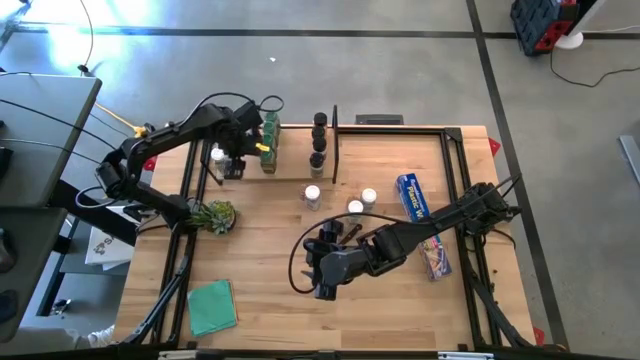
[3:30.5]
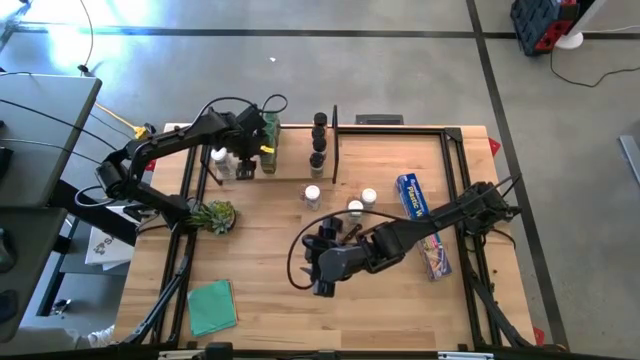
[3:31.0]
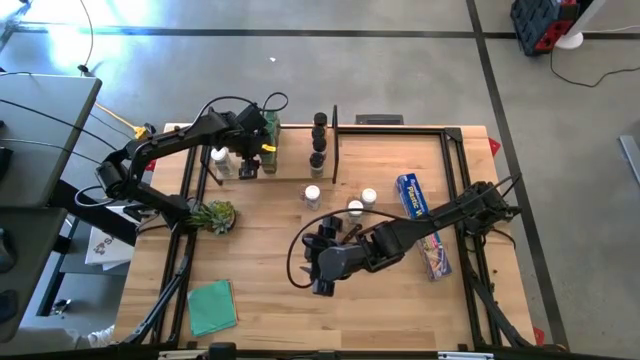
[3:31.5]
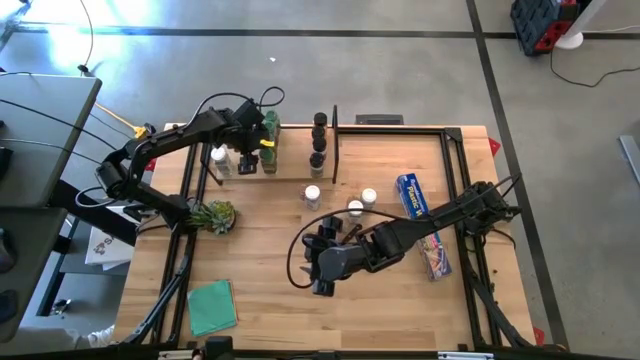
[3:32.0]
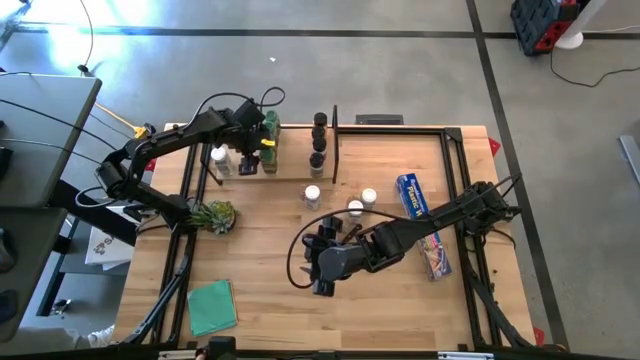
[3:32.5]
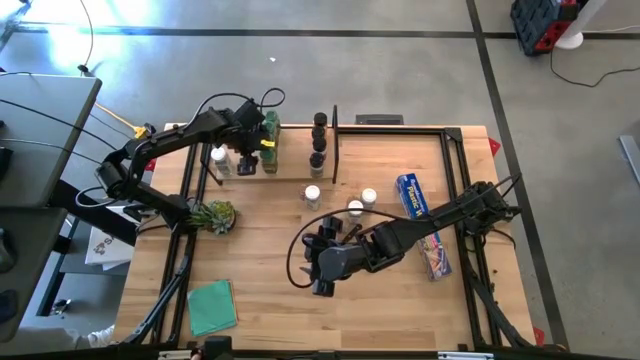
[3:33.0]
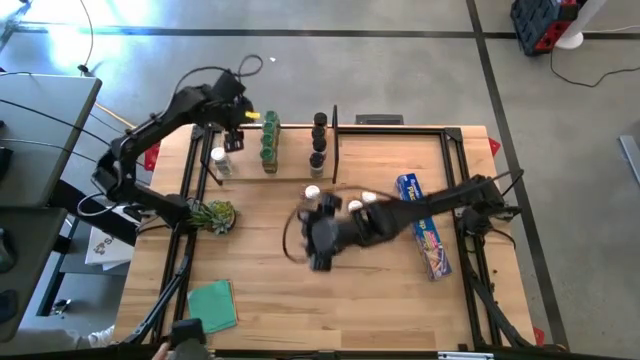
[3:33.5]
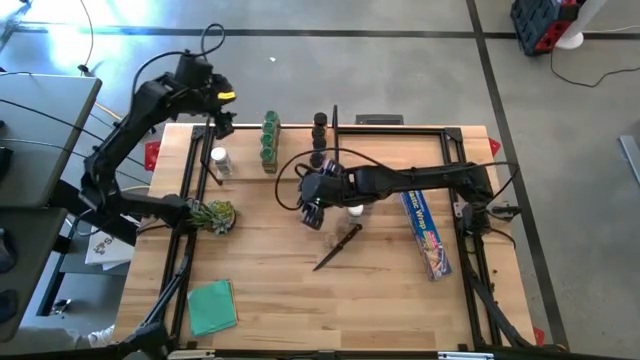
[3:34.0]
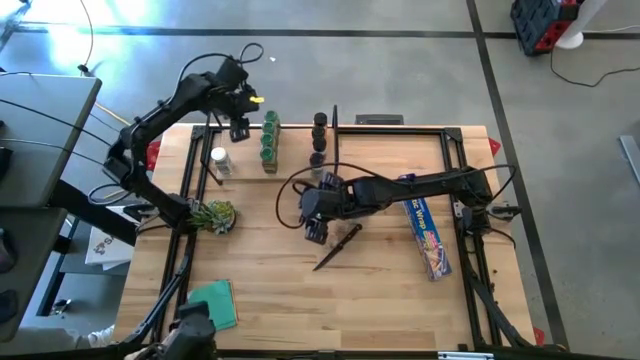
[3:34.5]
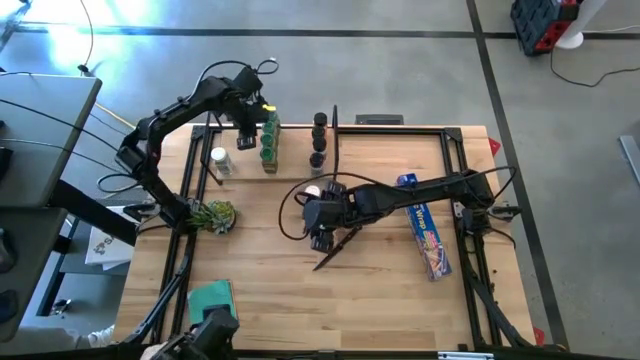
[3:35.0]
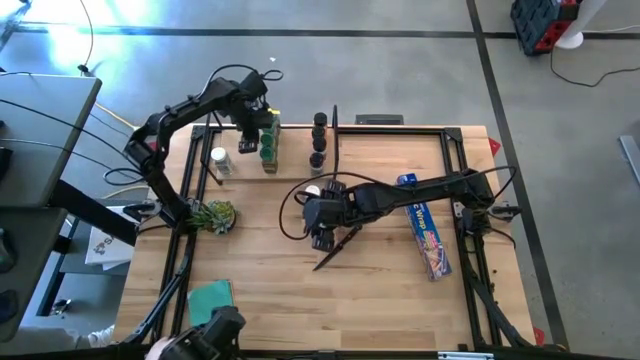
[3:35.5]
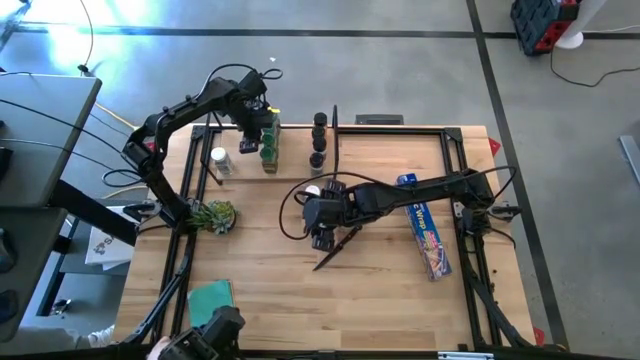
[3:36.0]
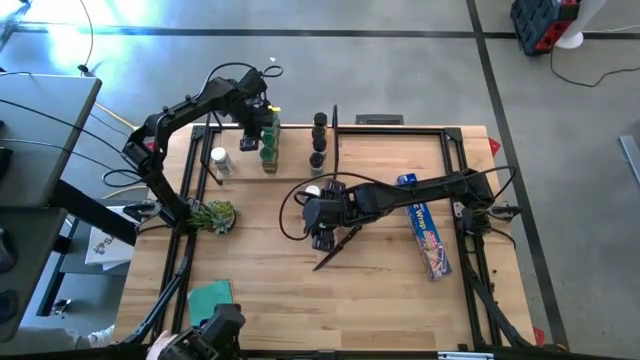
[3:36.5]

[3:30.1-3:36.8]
Task: Shelf spices
Adjust the green lid seasoning bottle

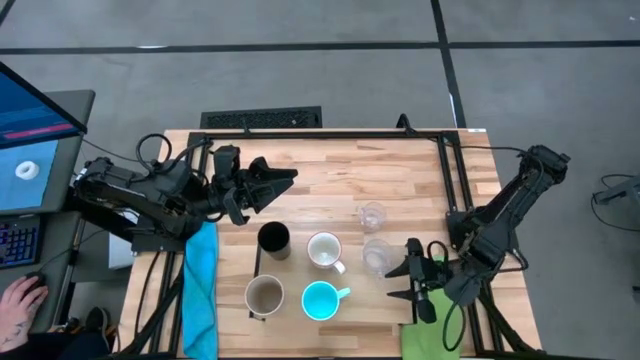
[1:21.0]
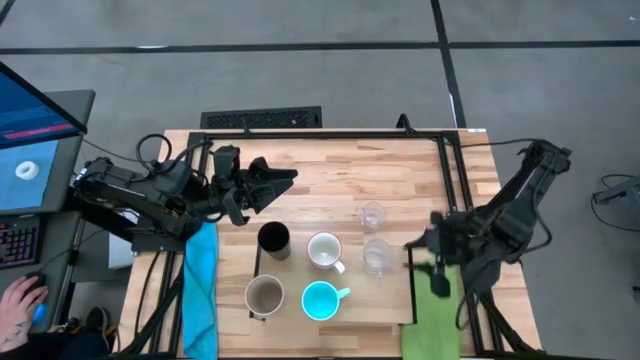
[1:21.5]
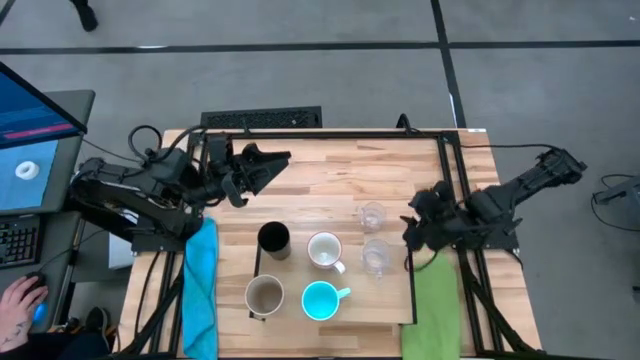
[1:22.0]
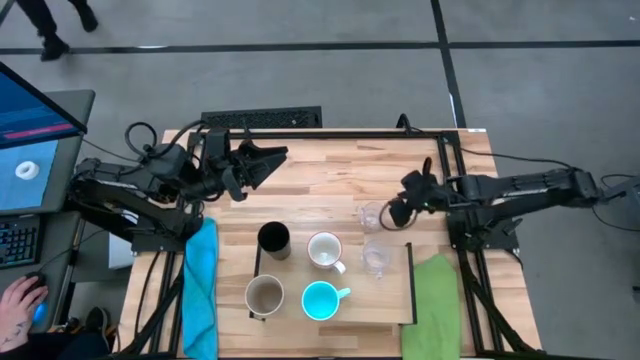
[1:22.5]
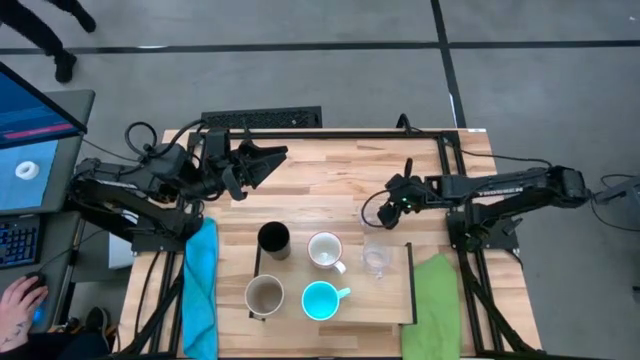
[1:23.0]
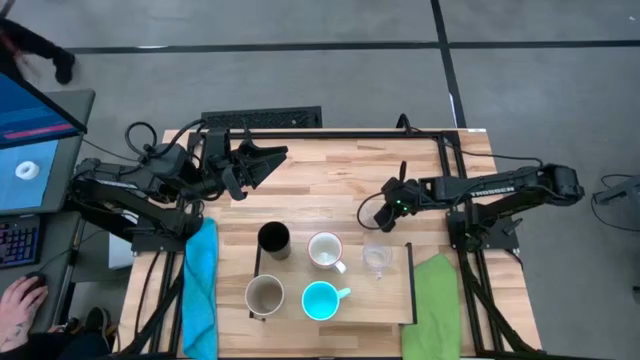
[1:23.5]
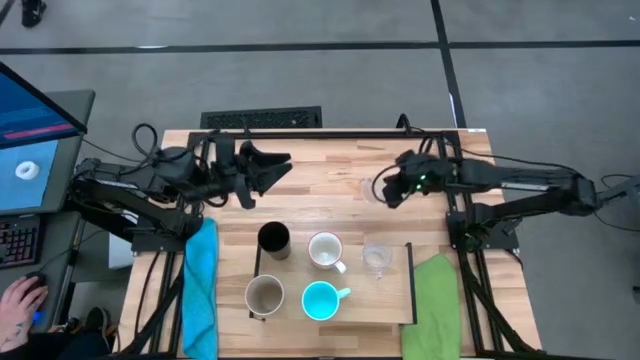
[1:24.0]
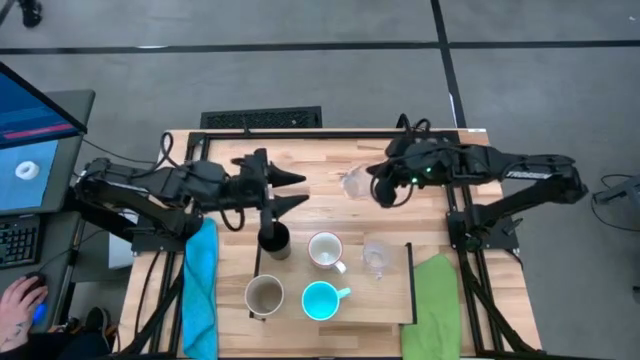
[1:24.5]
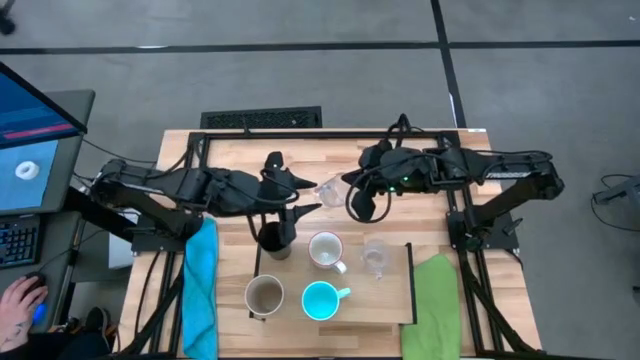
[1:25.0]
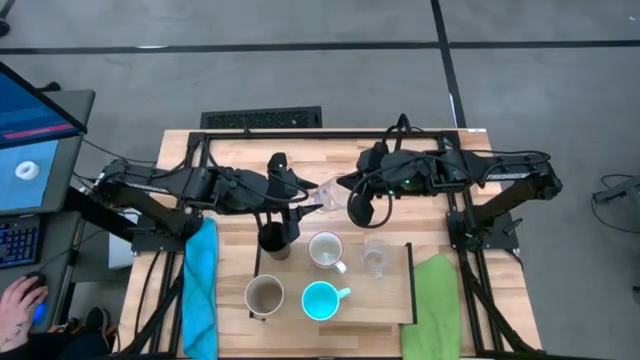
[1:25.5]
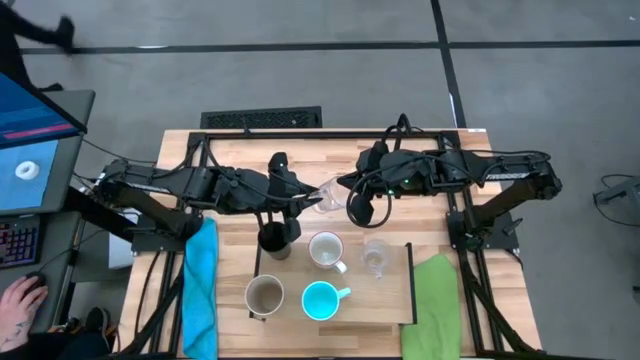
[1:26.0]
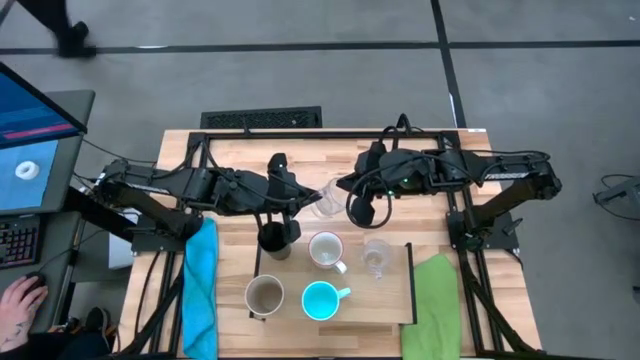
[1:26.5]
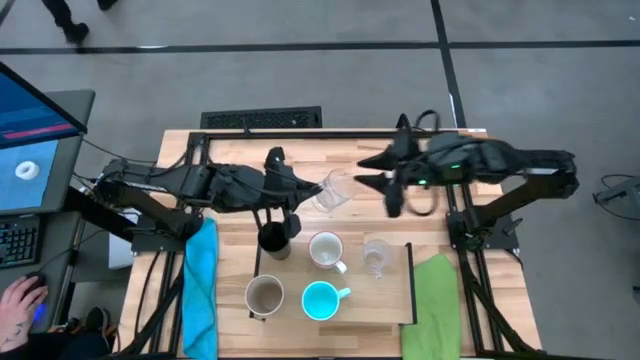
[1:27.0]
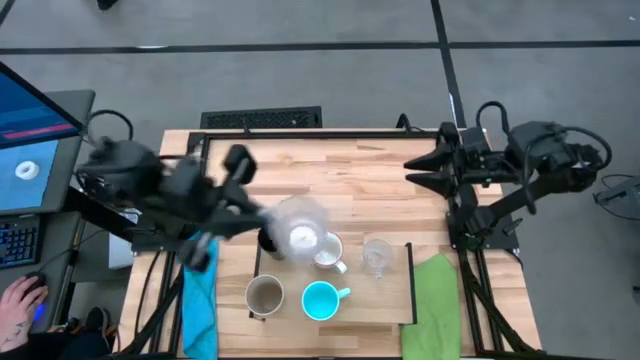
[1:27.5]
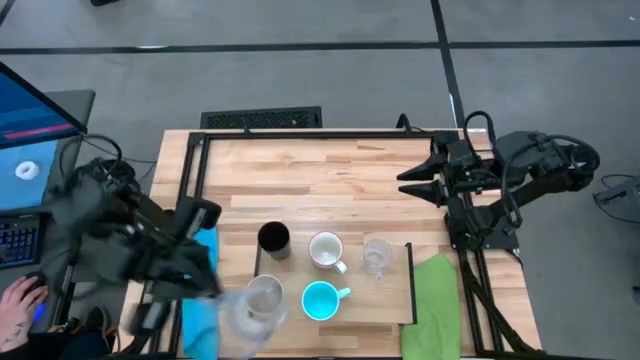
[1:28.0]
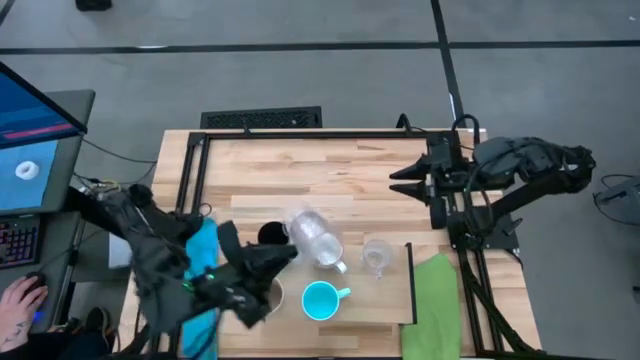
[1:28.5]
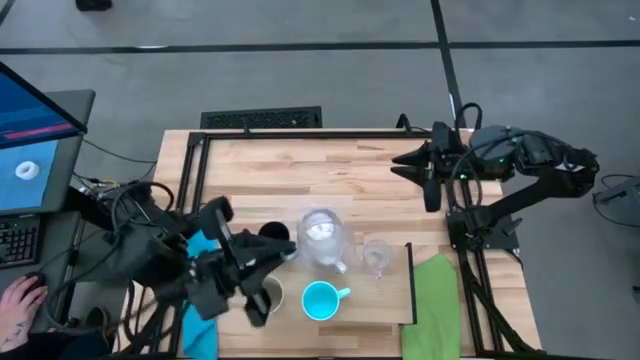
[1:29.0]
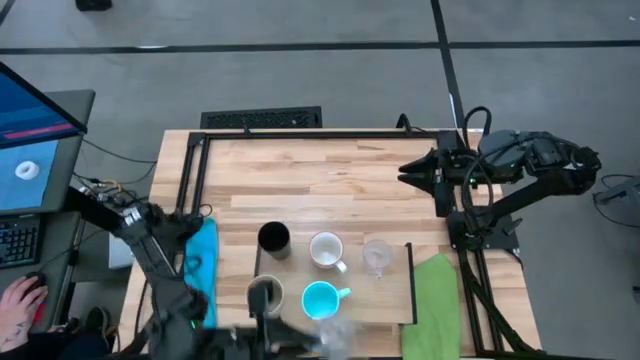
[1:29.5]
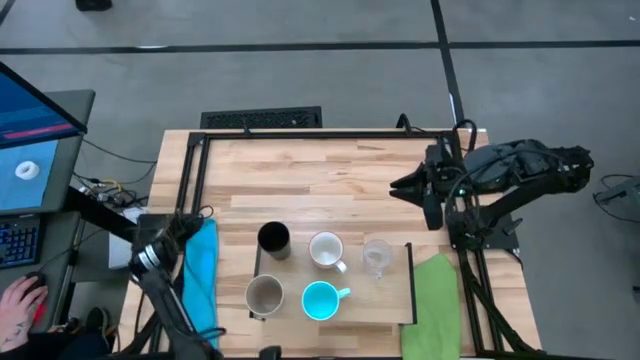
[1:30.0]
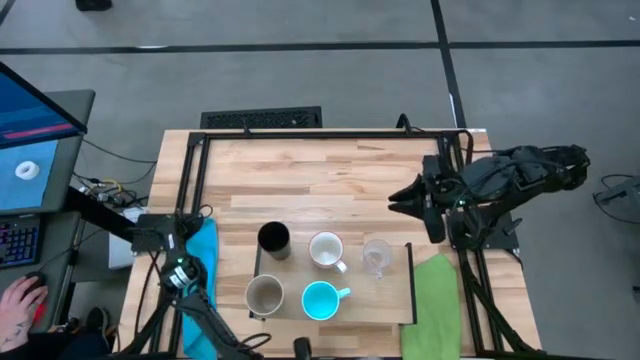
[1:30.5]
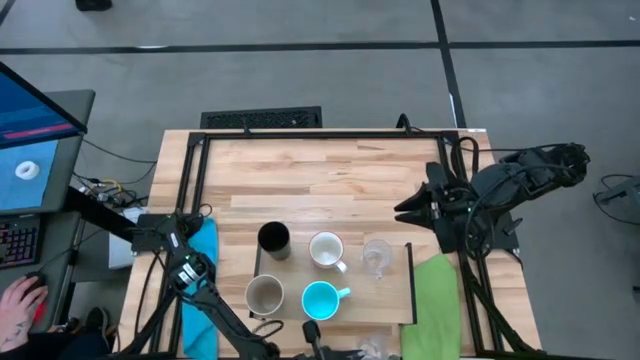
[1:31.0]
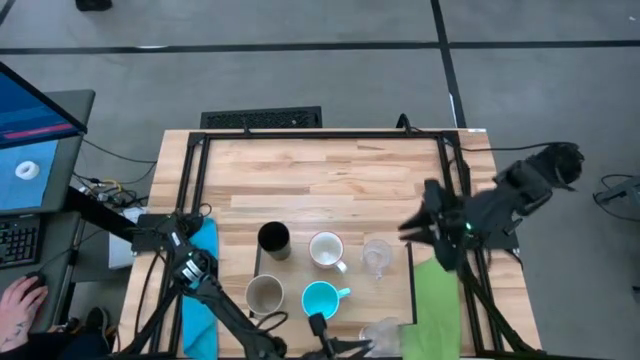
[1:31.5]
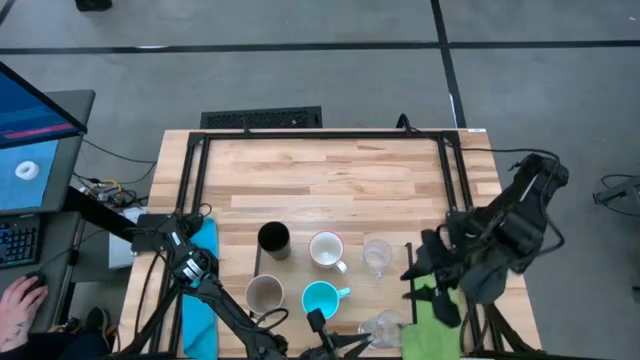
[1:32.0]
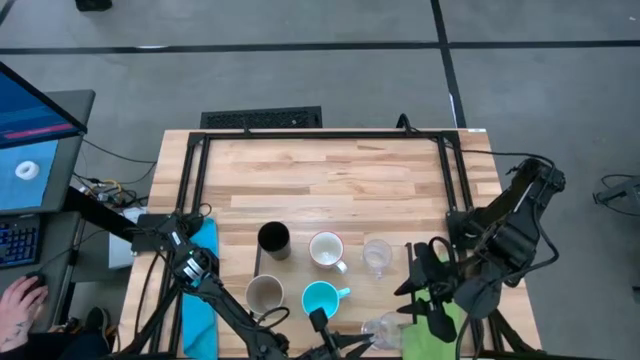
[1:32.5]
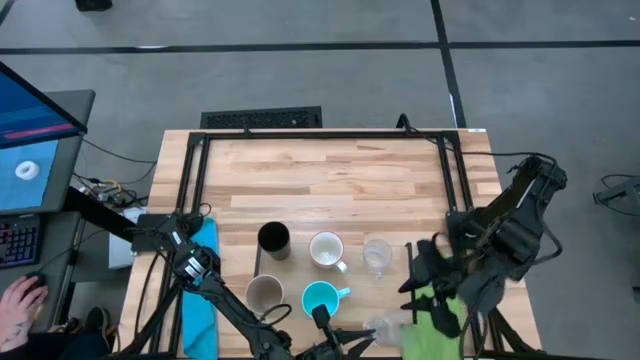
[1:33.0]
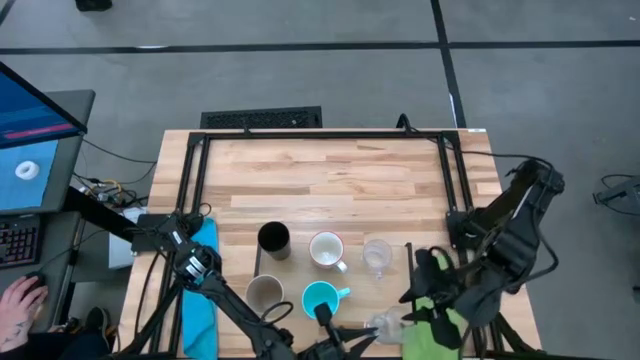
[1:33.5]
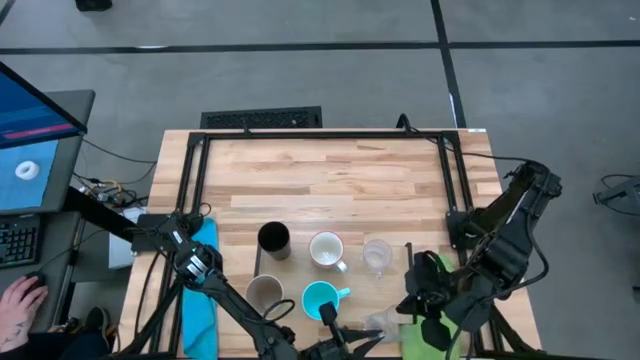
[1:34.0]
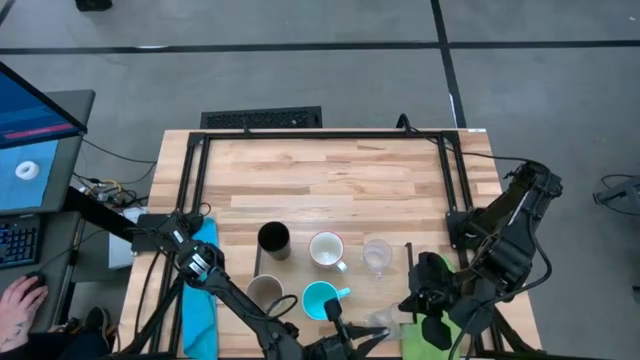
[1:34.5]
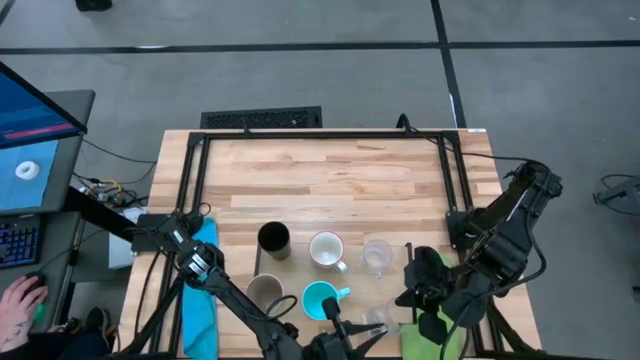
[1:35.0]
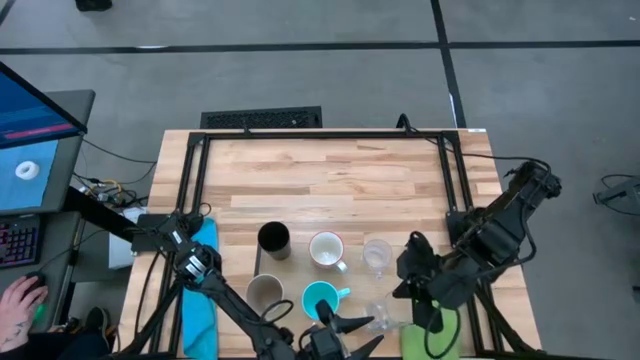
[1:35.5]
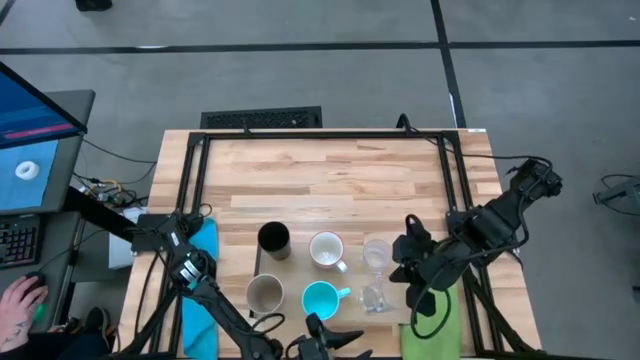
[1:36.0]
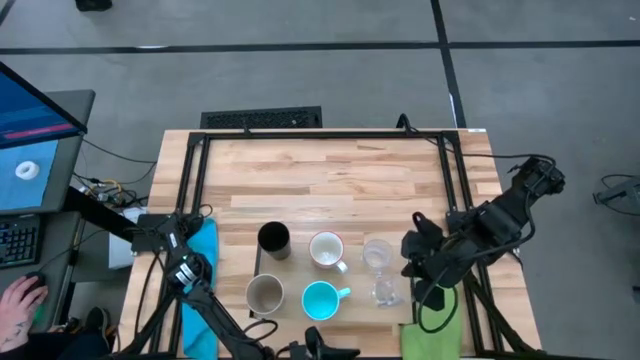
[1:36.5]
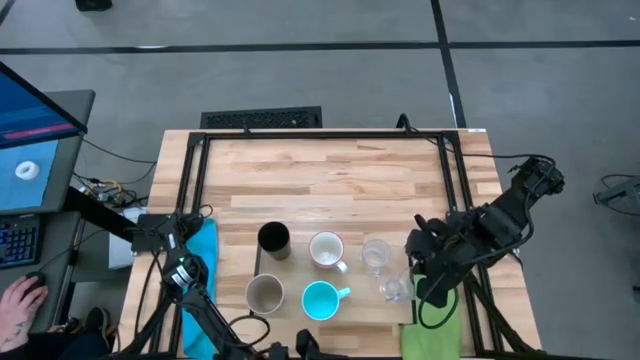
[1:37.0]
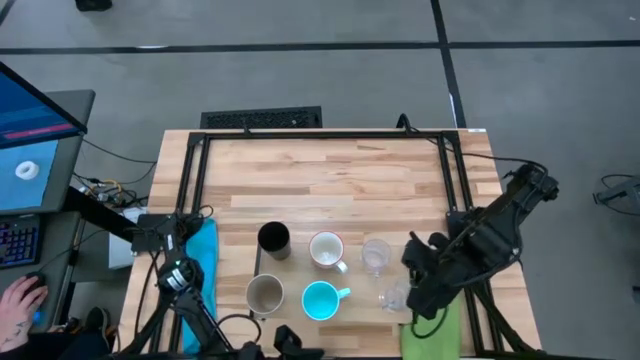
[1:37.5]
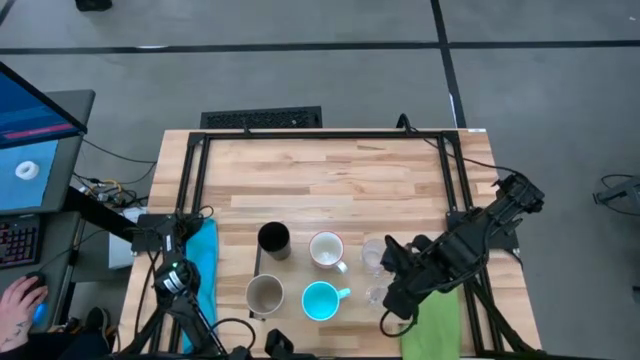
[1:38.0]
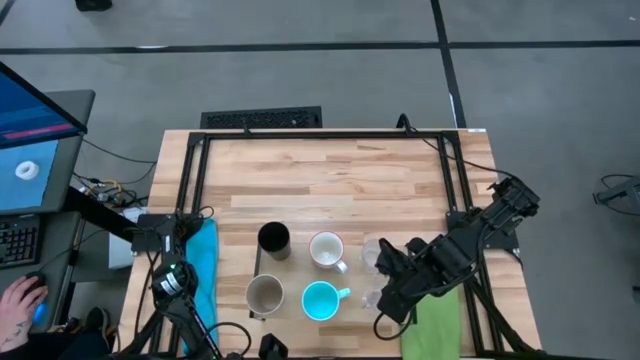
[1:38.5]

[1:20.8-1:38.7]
Task: Stack small to large cups/mugs on shelf
Put the transparent mug on the shelf
